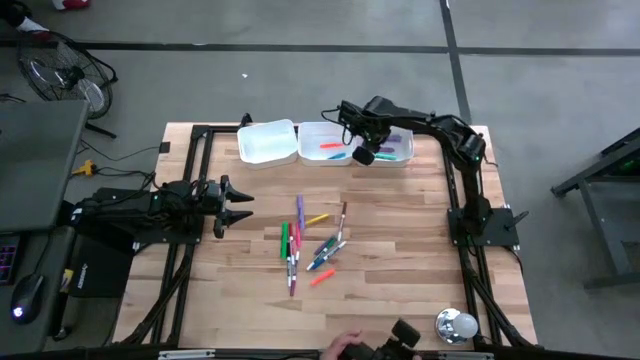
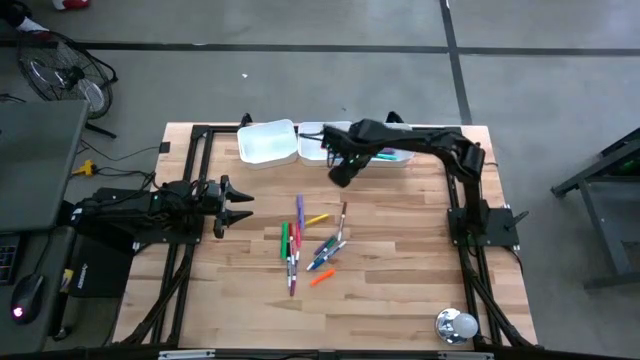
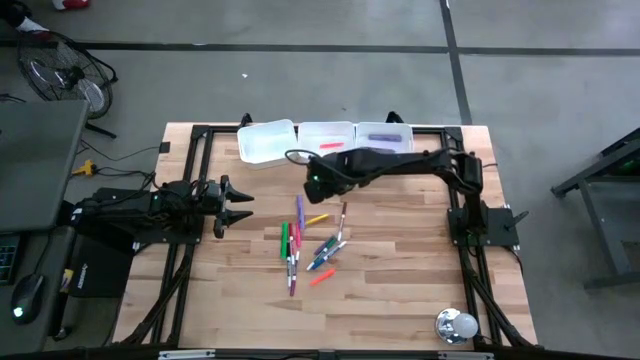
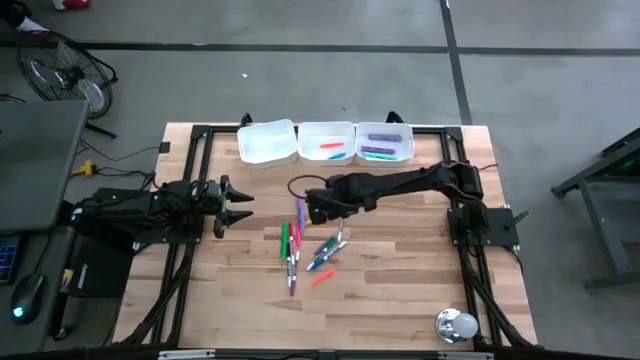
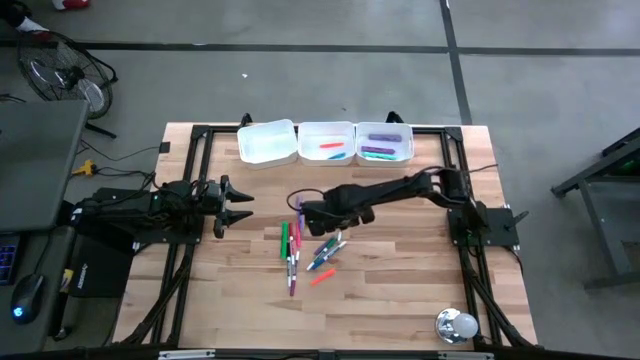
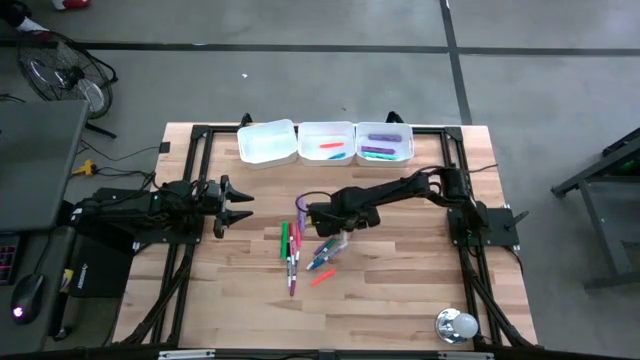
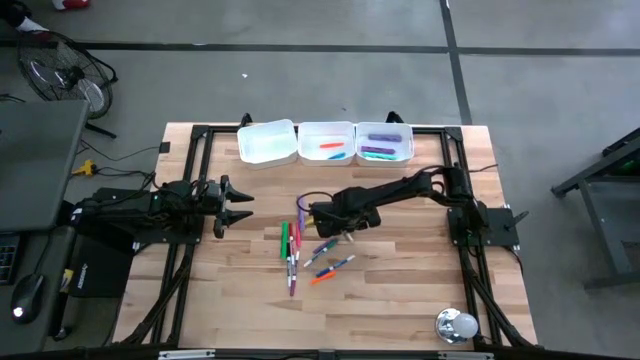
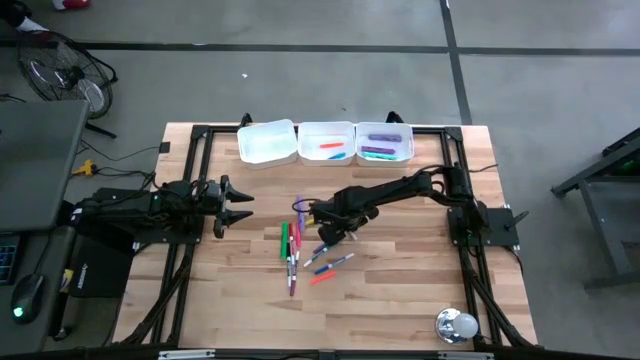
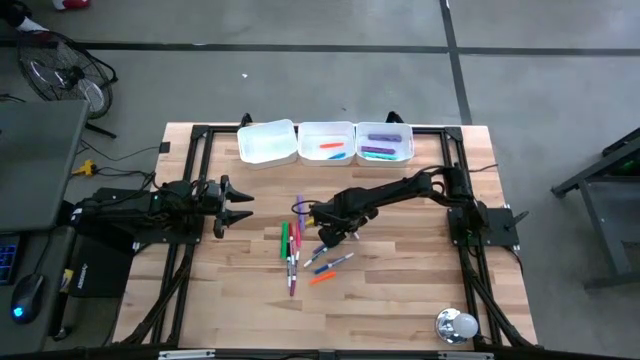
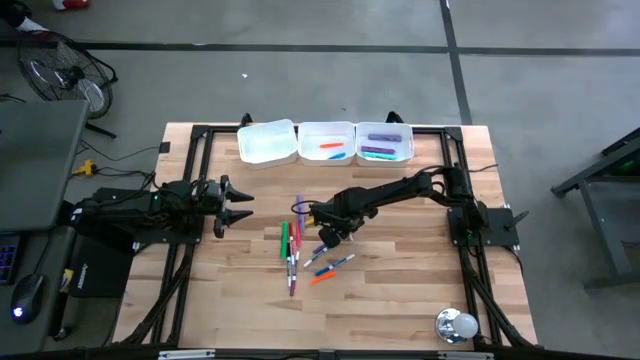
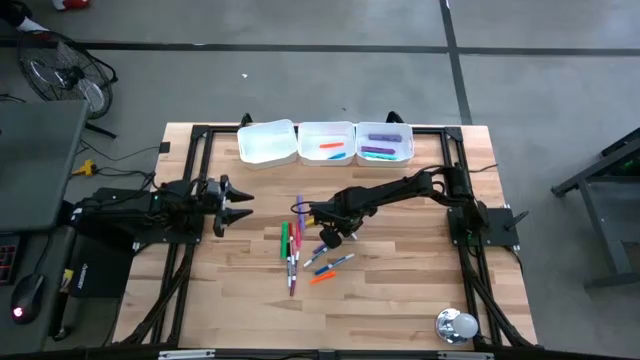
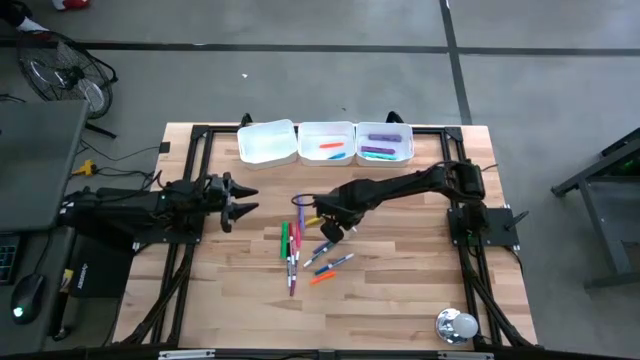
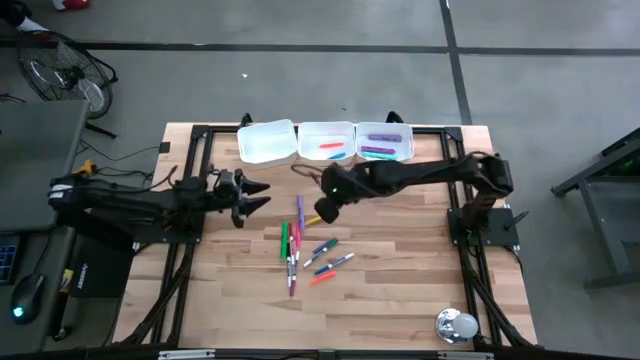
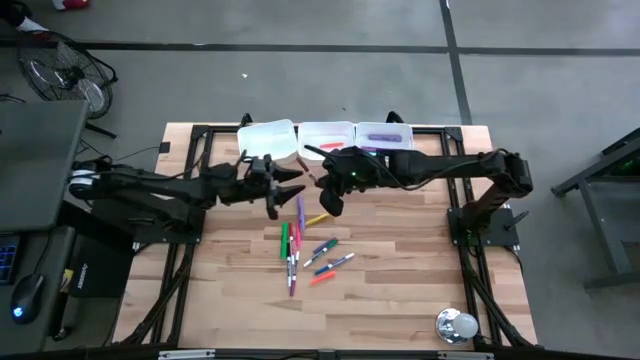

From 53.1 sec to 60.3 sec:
Task: Pick & Place Markers
Put the brown marker pen into the left white bin

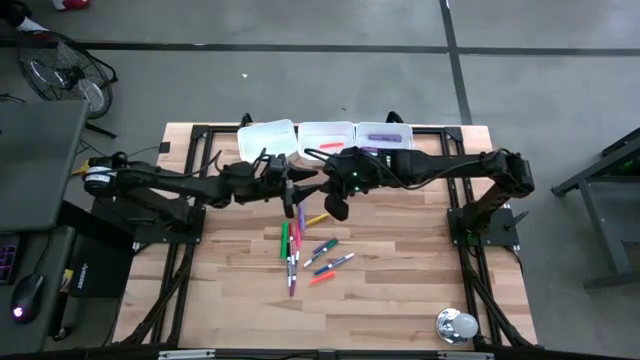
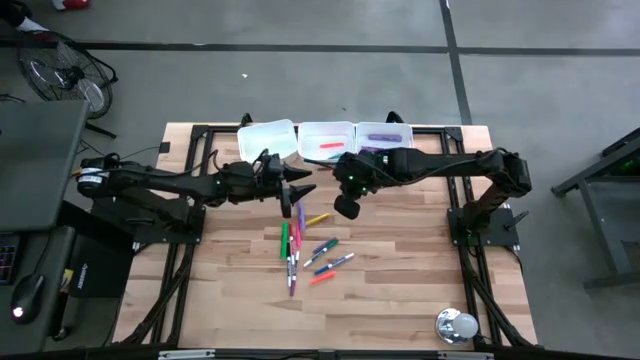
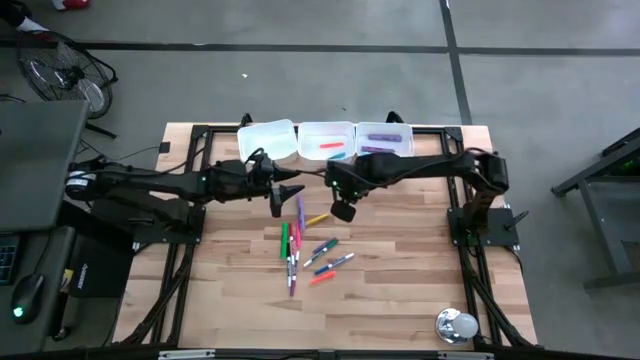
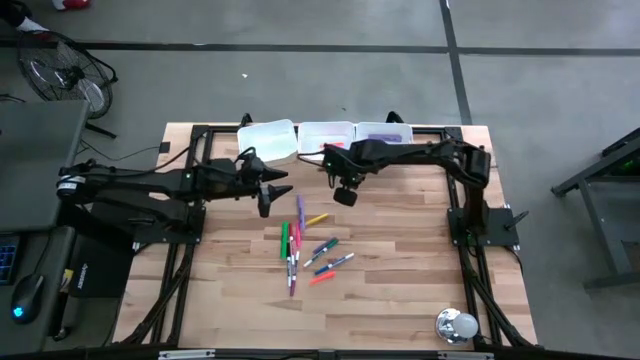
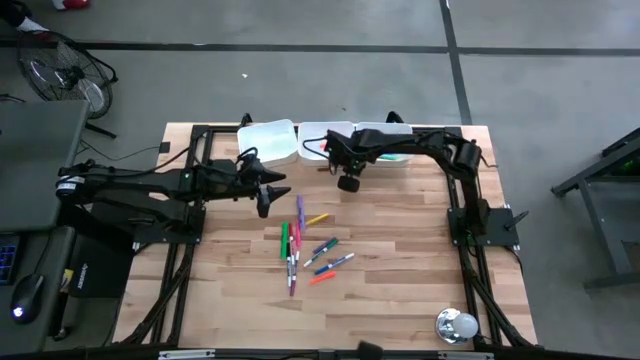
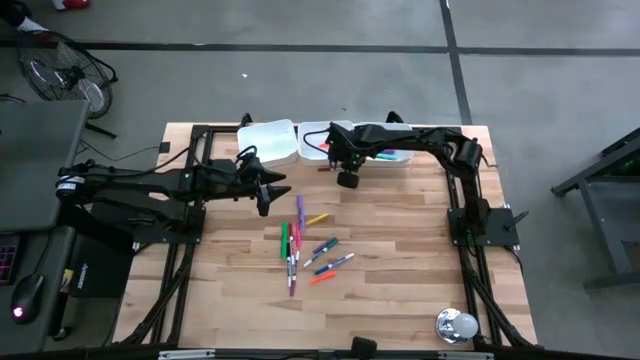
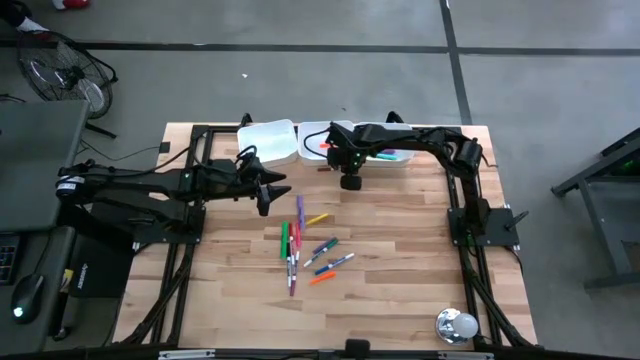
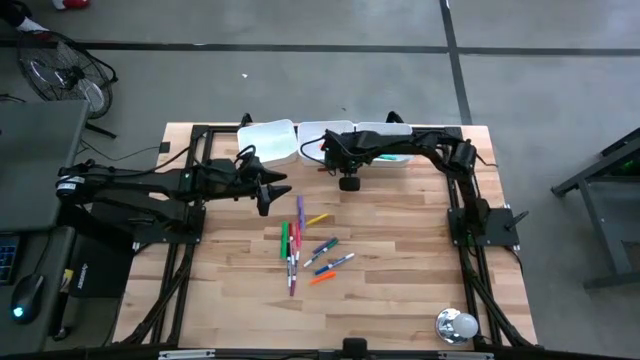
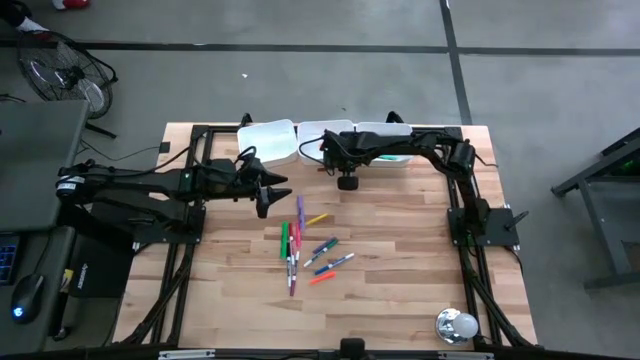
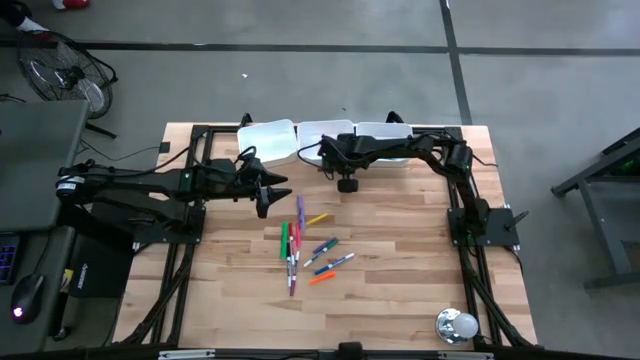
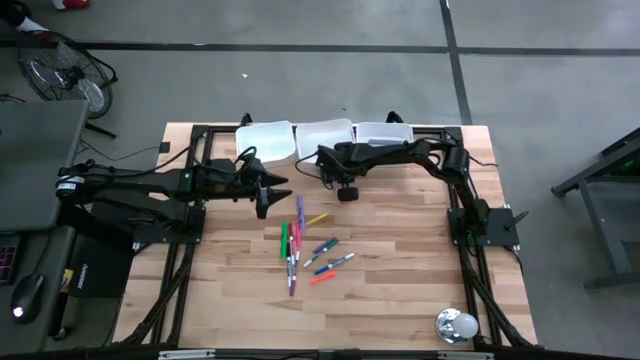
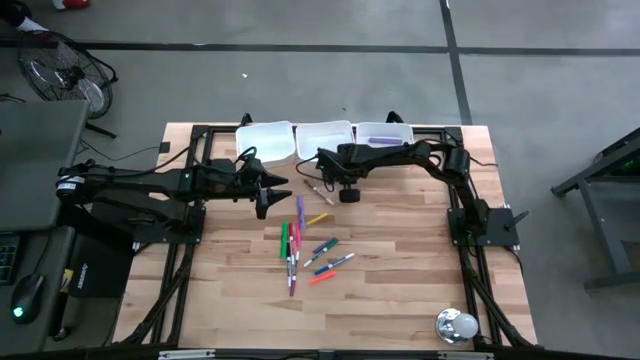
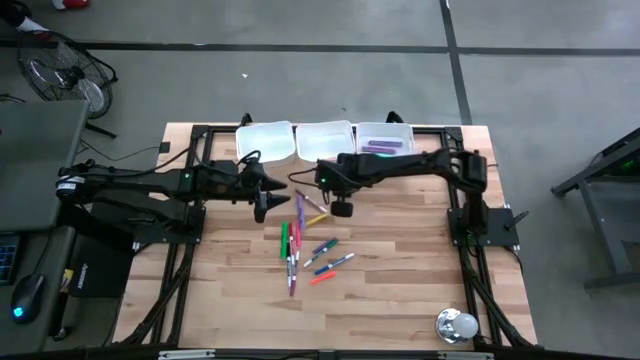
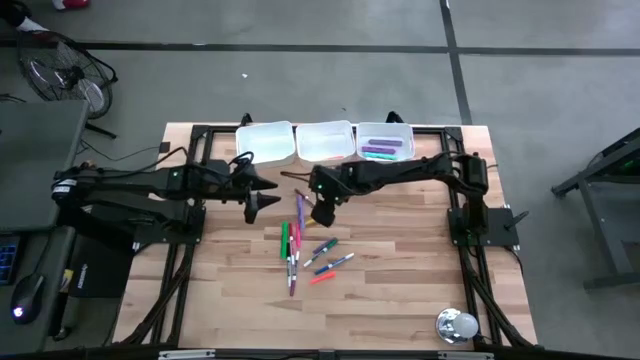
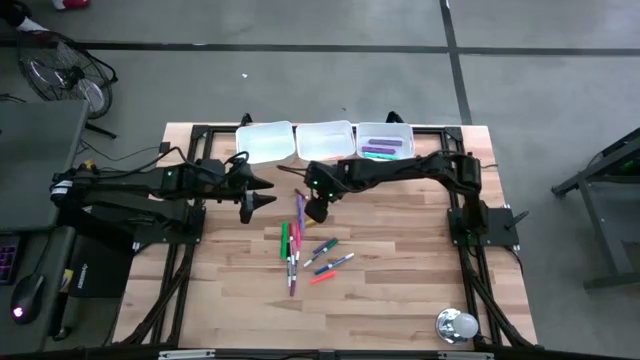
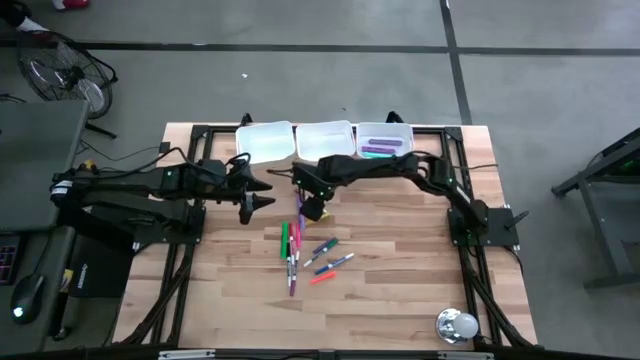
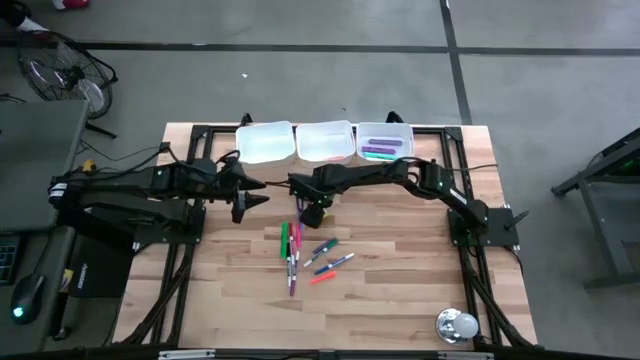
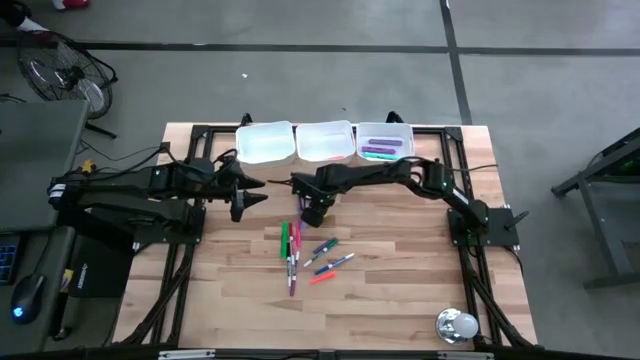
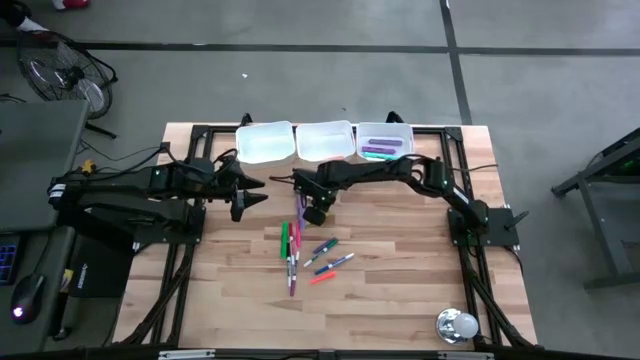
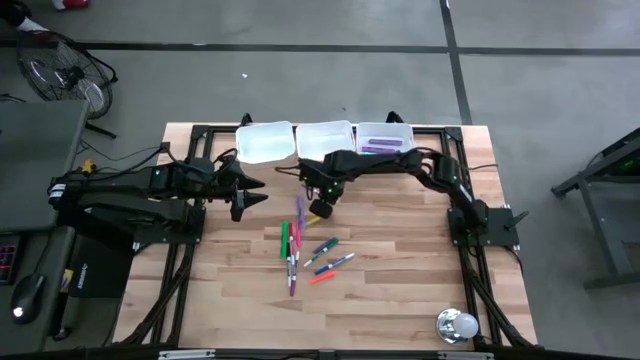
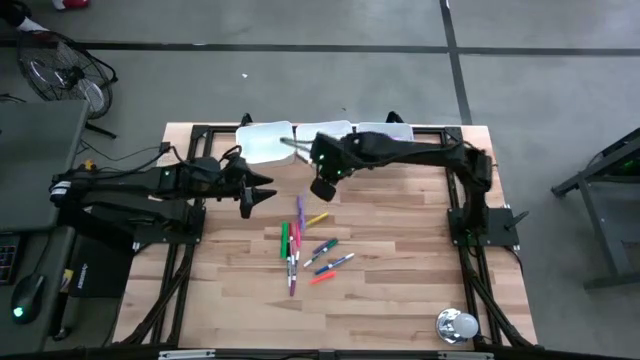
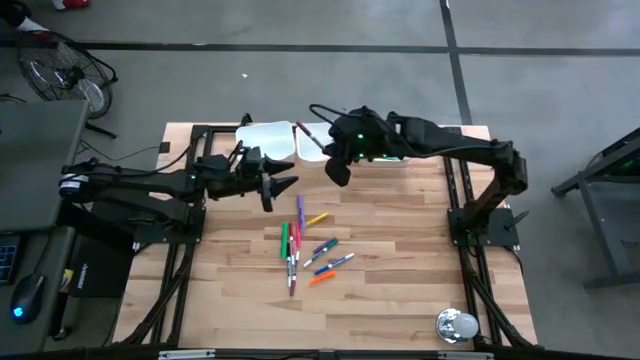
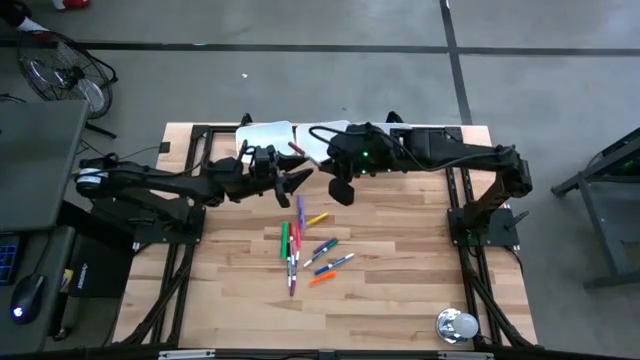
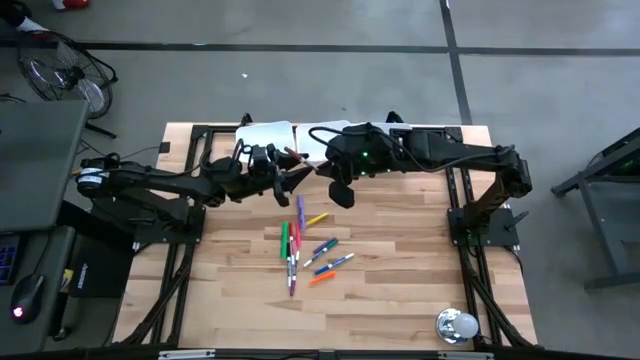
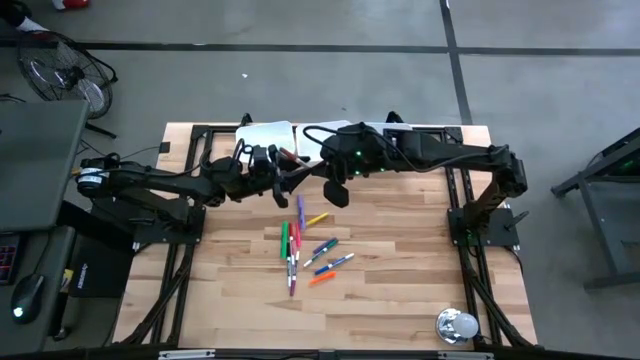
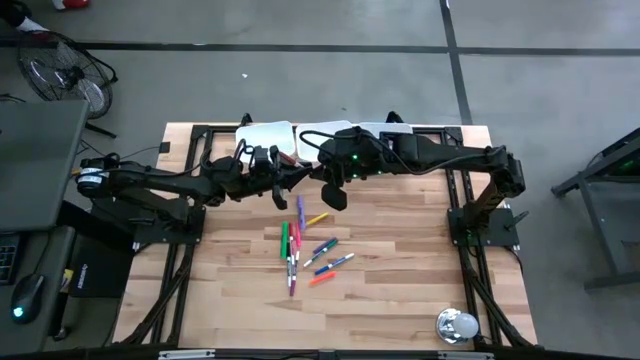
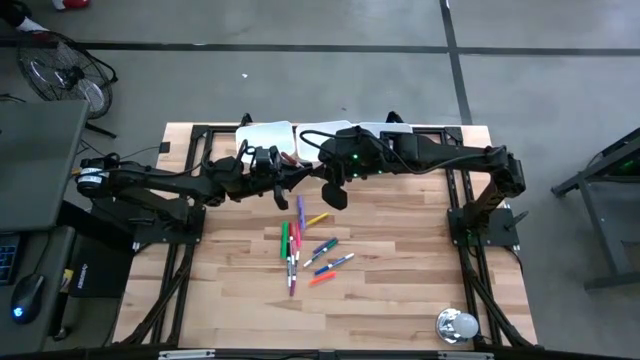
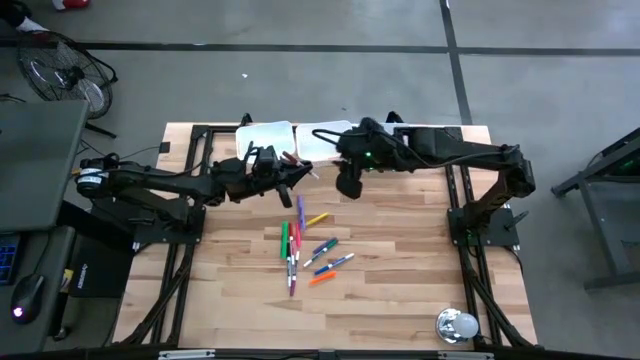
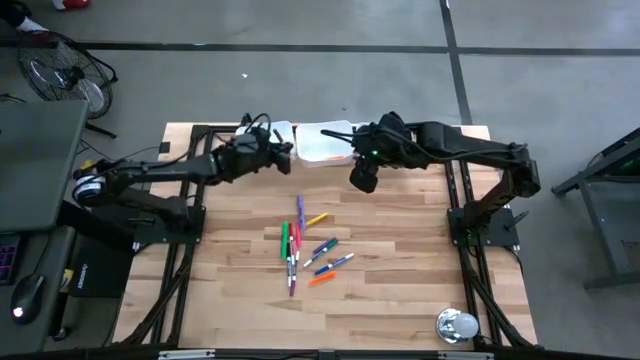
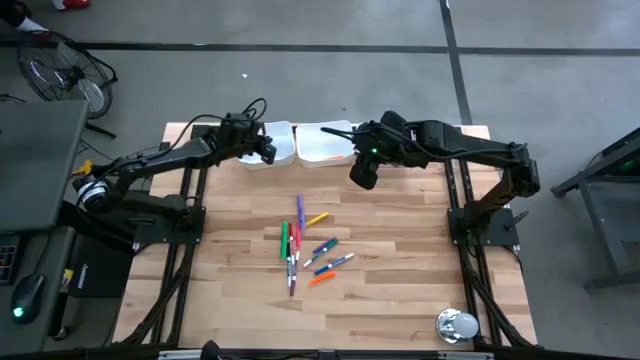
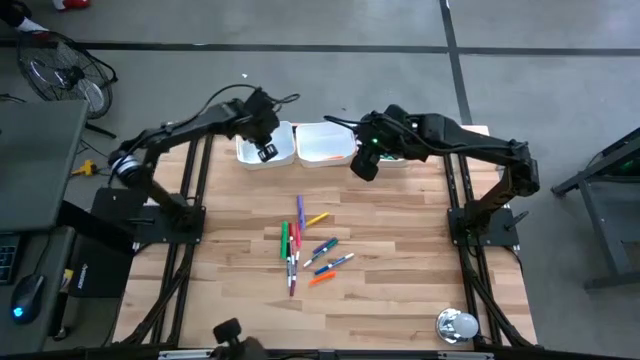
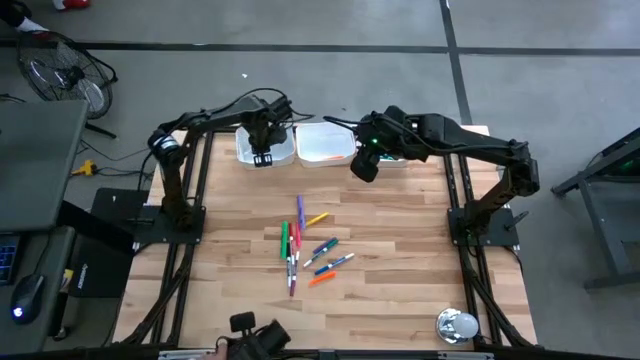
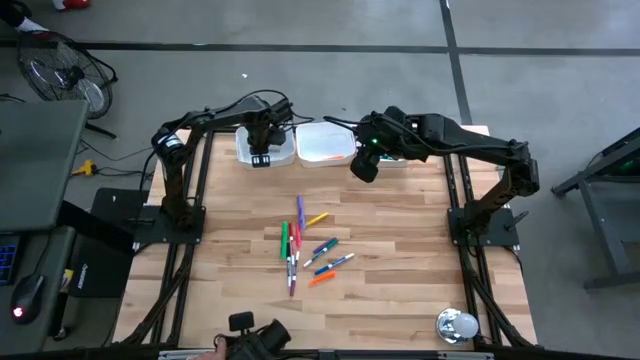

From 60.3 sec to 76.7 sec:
Put the brown marker pen into the left white bin
